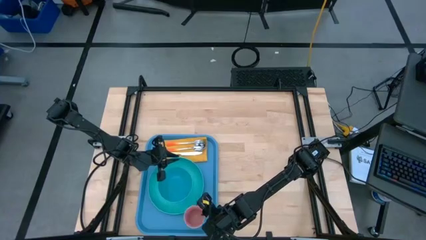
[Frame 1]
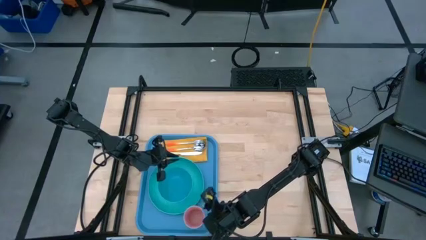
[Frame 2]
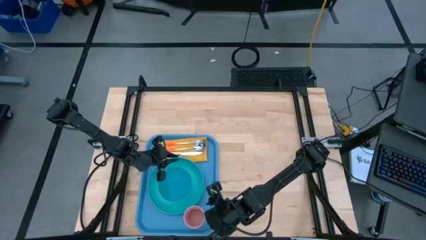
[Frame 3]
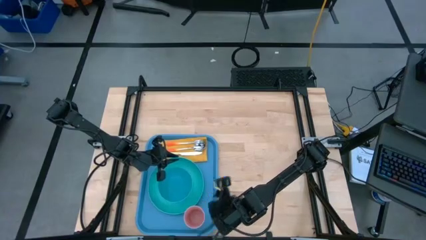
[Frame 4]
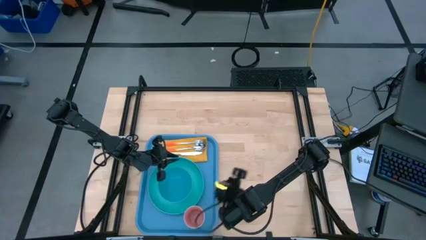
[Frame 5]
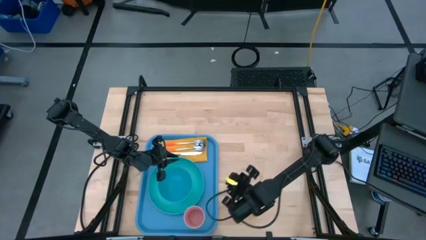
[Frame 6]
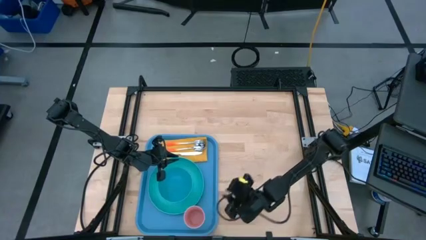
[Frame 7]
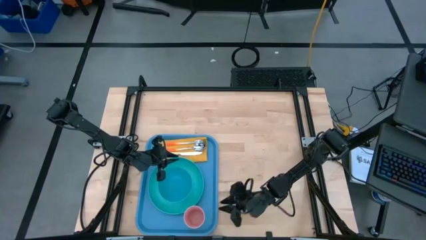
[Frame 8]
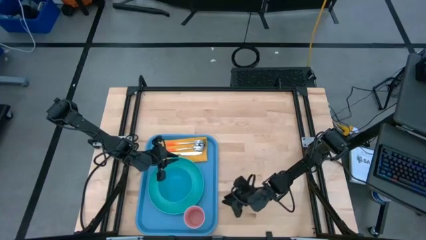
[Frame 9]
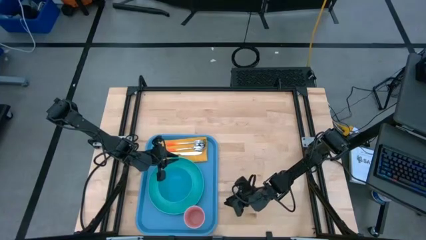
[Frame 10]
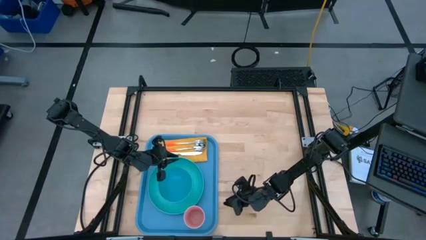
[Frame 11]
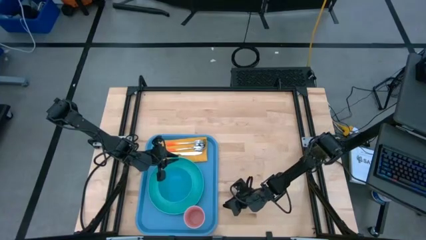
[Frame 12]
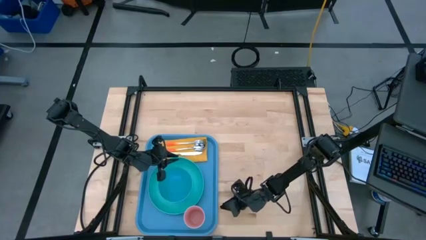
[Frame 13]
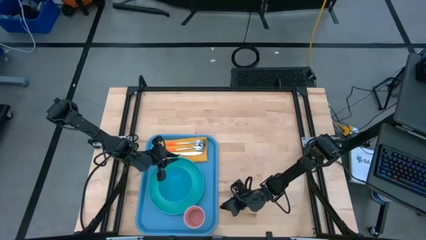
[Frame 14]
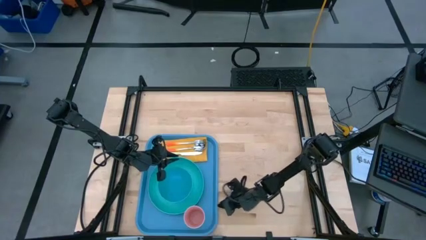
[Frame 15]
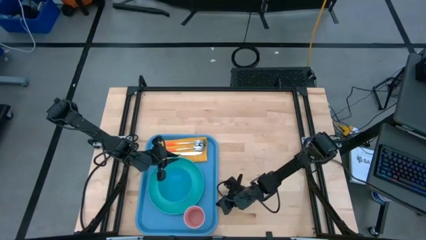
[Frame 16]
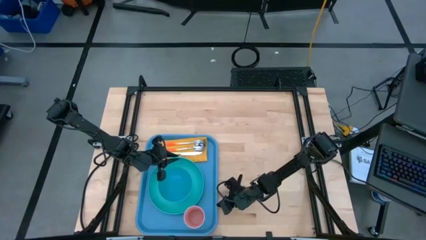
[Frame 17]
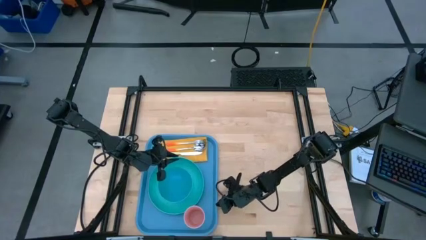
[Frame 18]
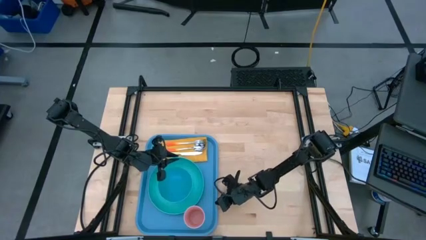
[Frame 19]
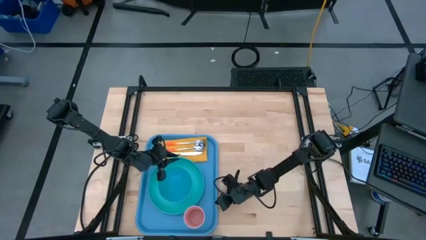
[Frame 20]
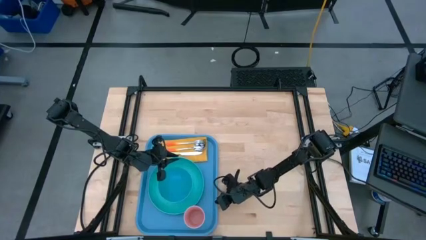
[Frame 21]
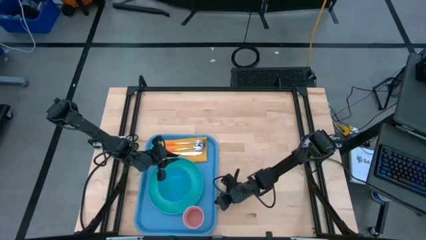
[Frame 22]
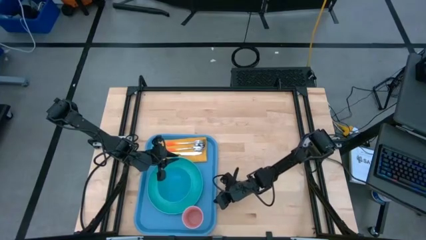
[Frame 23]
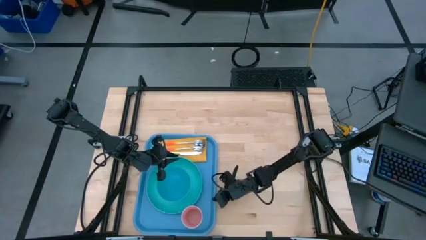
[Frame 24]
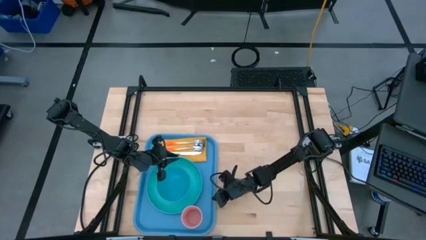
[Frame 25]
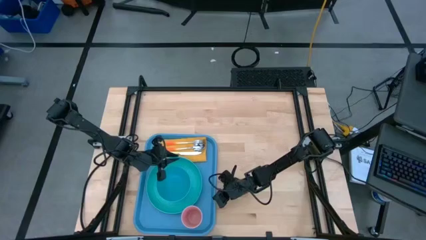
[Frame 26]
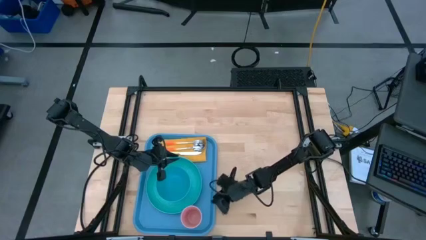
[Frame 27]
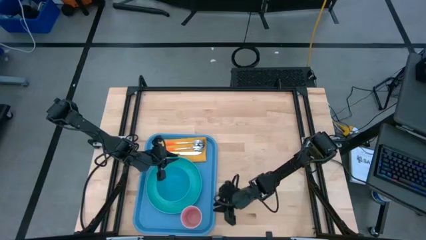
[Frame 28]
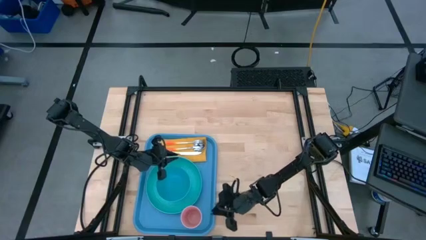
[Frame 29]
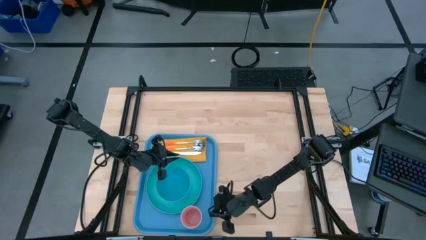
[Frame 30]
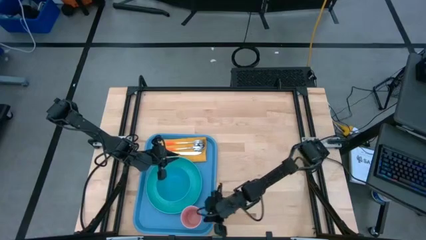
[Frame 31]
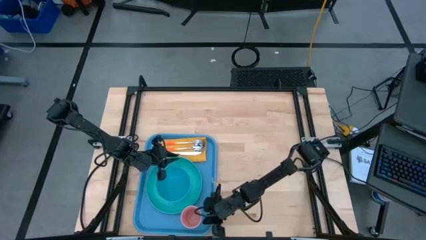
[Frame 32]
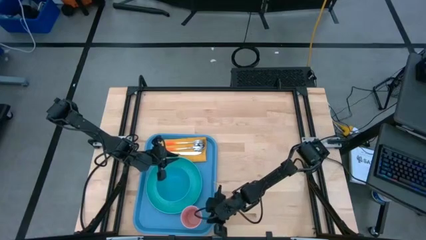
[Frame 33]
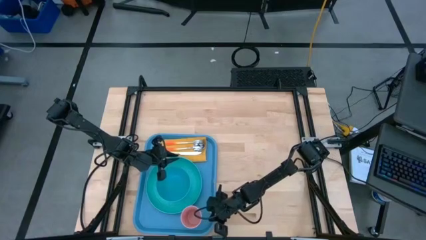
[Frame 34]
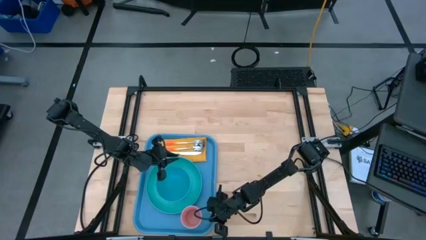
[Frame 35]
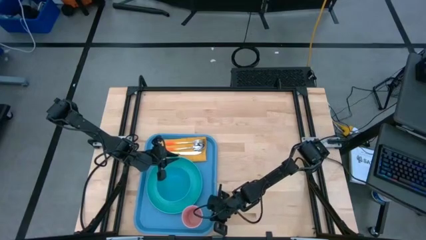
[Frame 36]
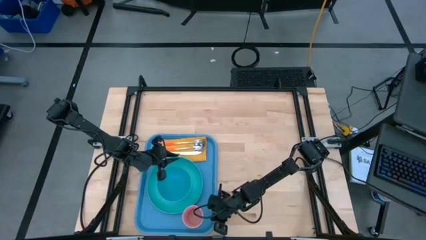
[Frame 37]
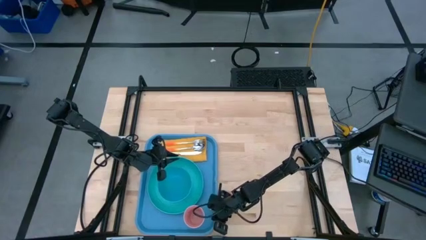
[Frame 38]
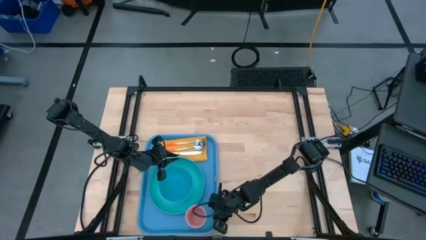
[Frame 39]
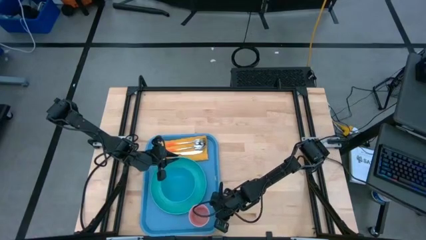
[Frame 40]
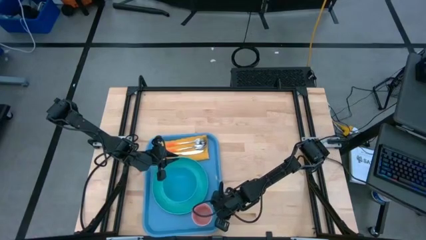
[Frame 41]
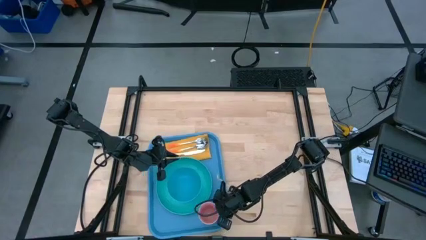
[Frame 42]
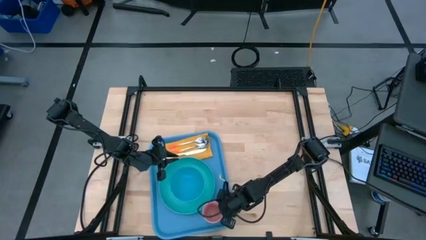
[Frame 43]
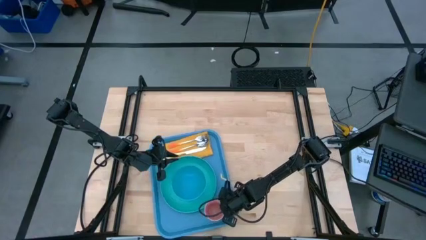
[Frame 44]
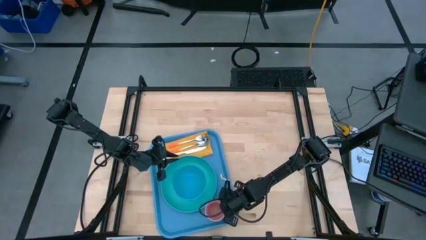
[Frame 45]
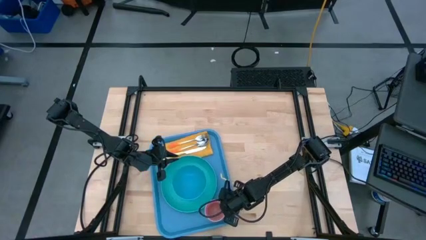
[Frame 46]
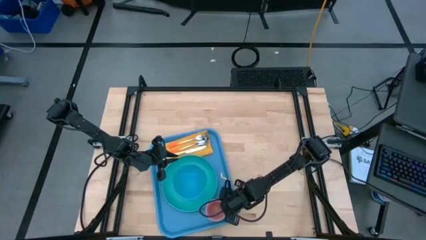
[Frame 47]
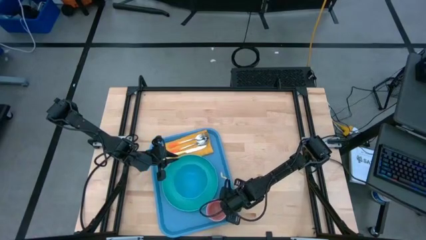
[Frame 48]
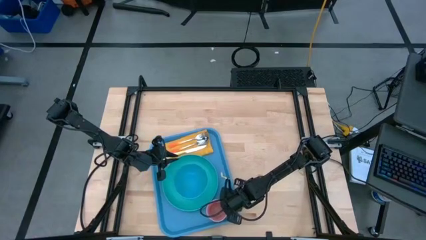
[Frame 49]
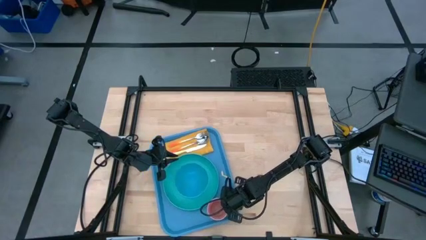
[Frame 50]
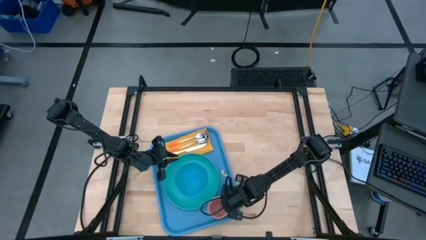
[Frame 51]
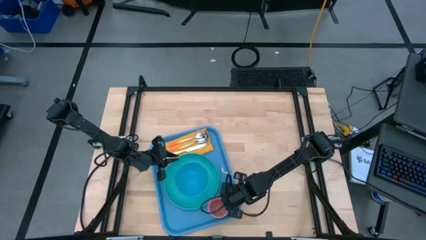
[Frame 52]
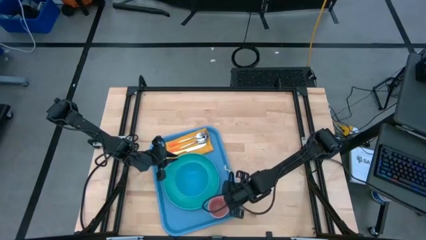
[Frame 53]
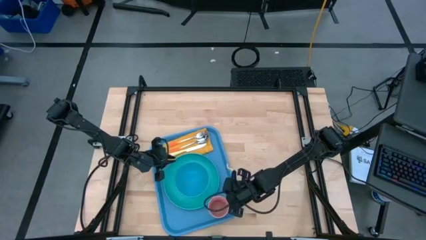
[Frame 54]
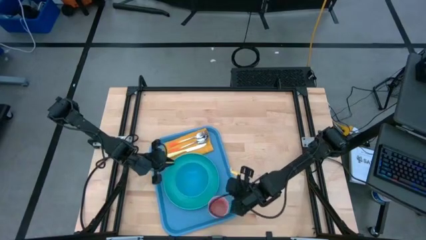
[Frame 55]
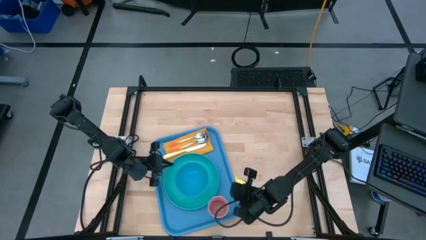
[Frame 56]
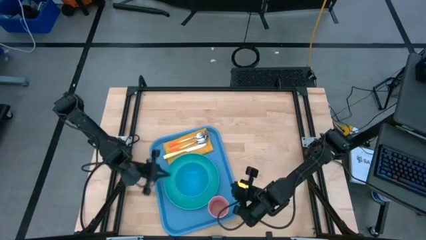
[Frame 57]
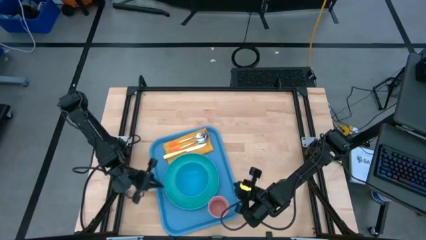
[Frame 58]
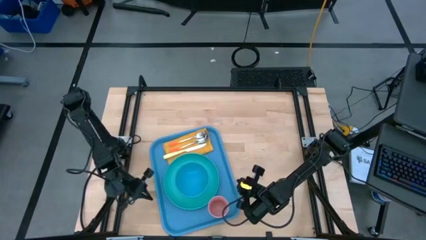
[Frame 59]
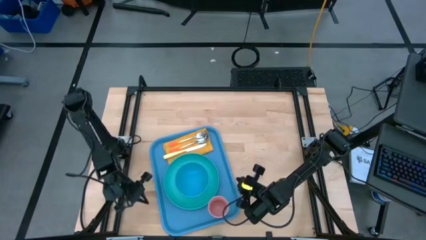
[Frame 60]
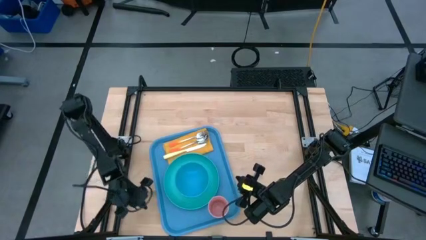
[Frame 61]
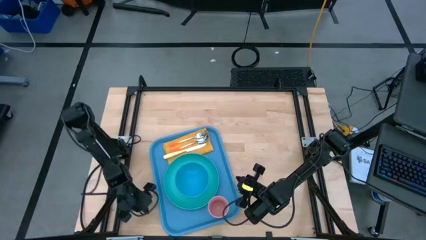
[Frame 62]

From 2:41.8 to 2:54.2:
Task: Set up tray
Move the blue serving tray to the center of the table
